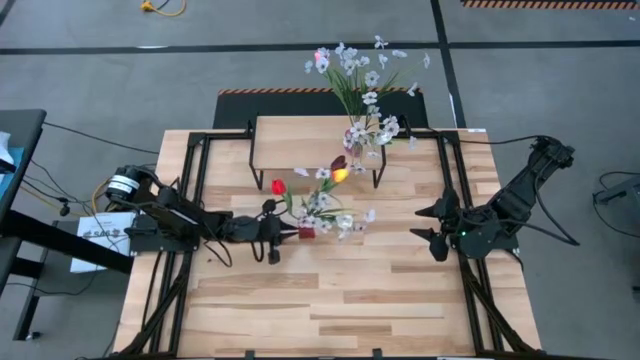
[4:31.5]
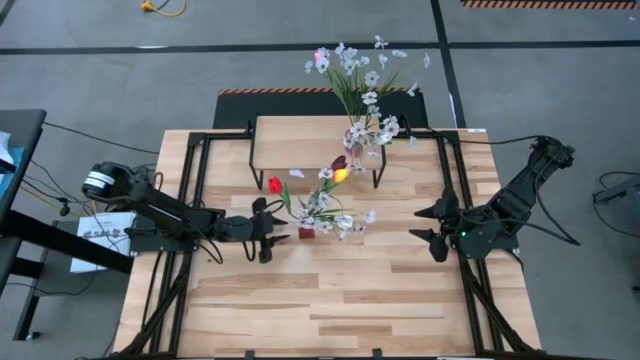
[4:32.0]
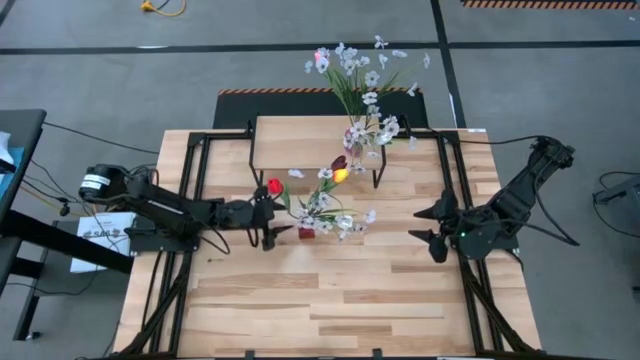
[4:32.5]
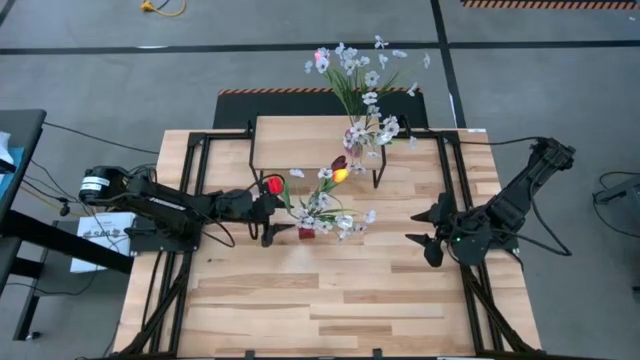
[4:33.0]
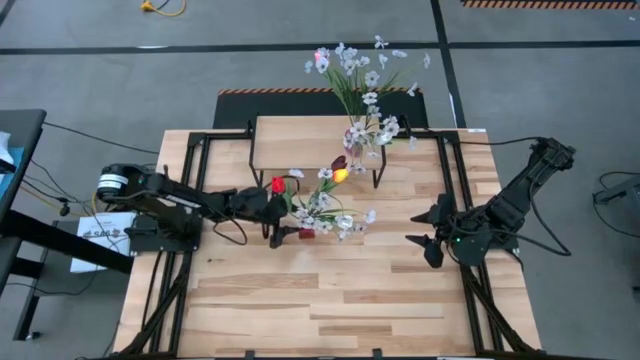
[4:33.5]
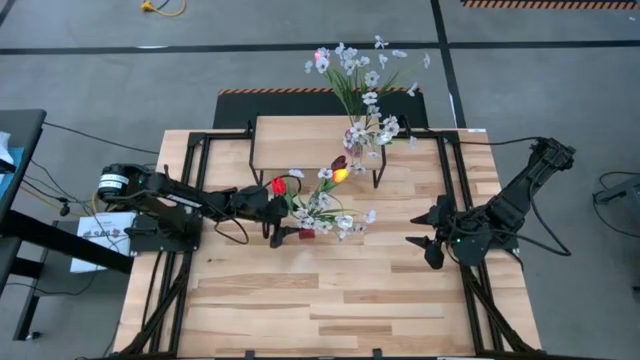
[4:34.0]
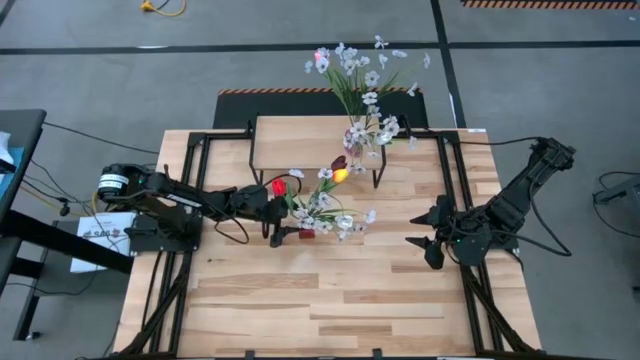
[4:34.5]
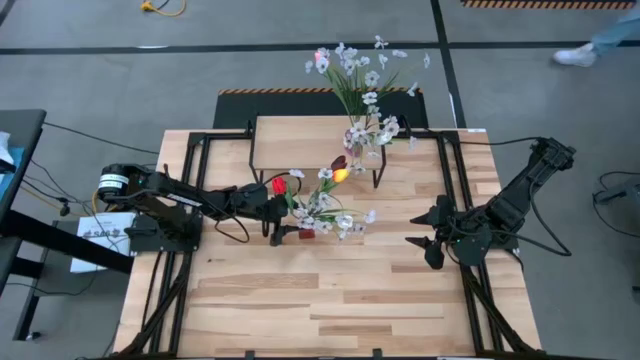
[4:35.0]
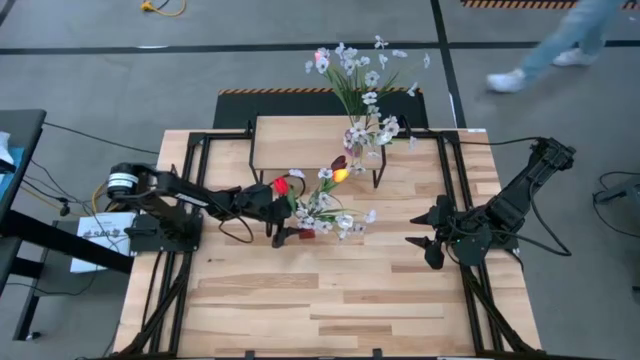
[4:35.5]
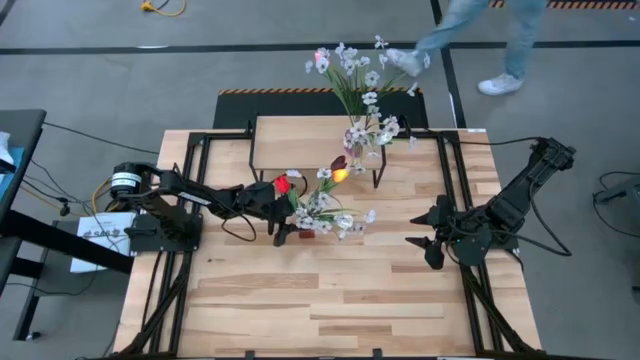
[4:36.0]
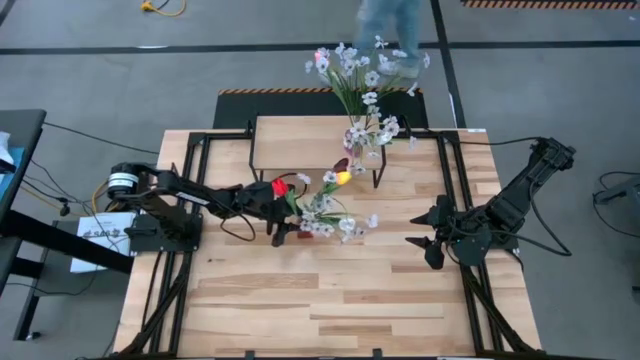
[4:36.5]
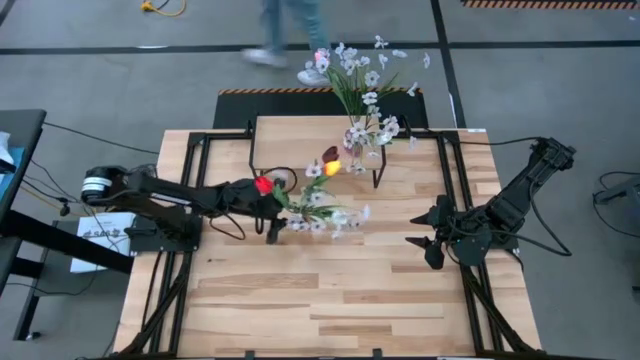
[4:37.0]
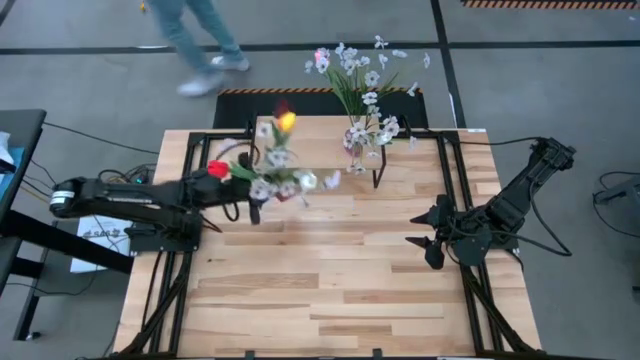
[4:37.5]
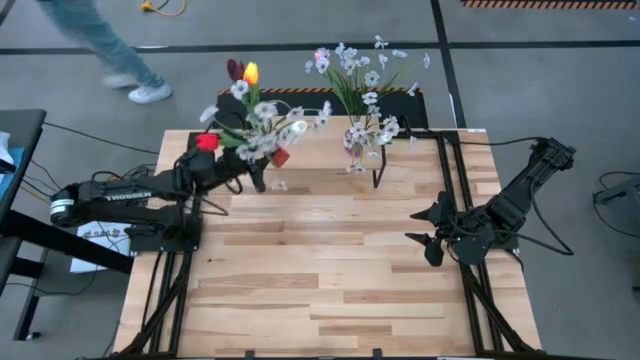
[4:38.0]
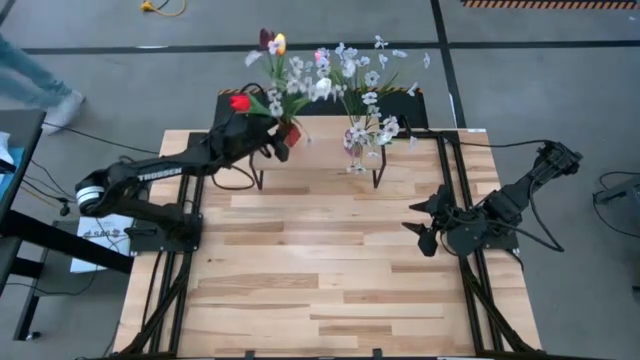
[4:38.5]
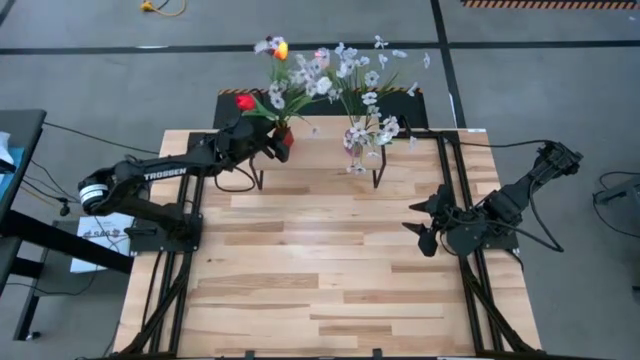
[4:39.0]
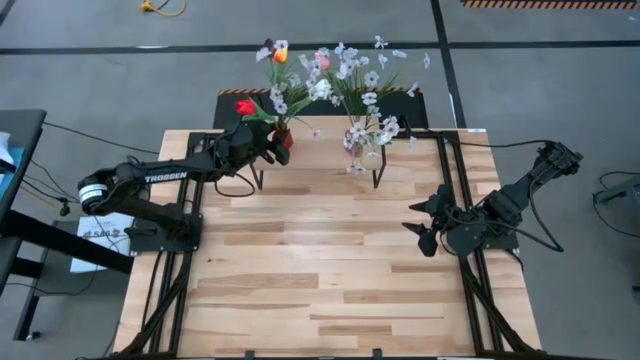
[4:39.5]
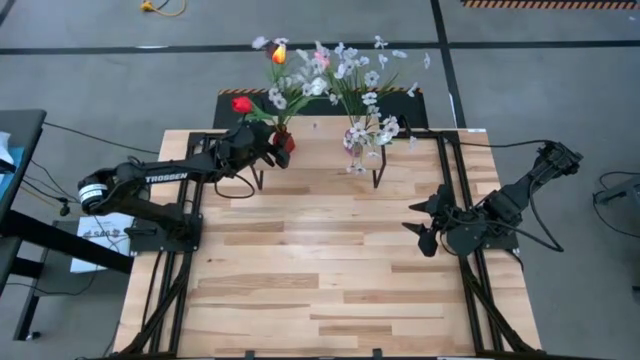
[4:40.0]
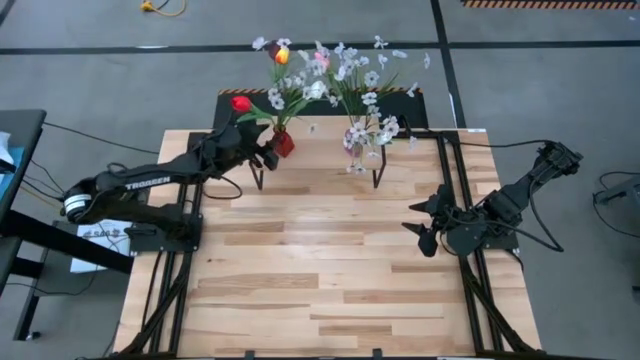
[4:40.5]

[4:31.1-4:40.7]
Task: Pick and place flowers into a vace then onto a shelf
Put the red vase on the shelf

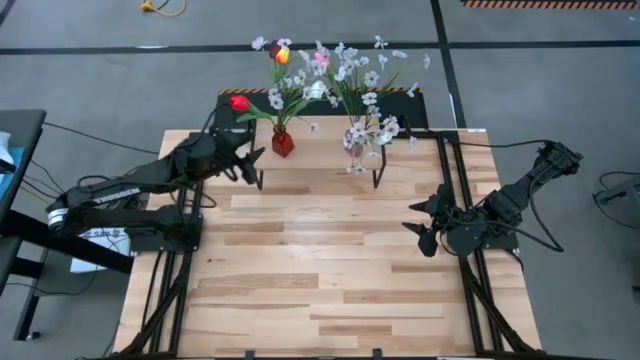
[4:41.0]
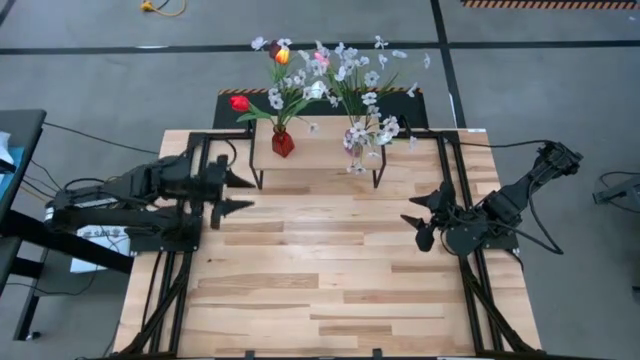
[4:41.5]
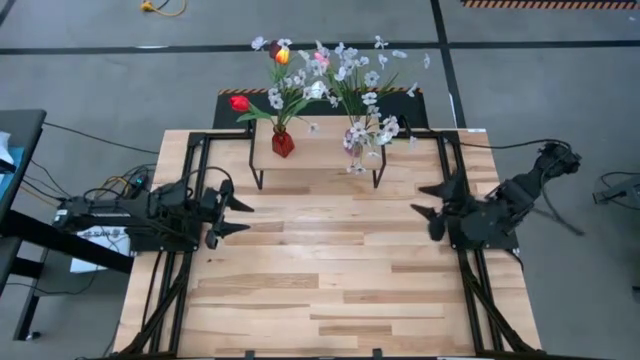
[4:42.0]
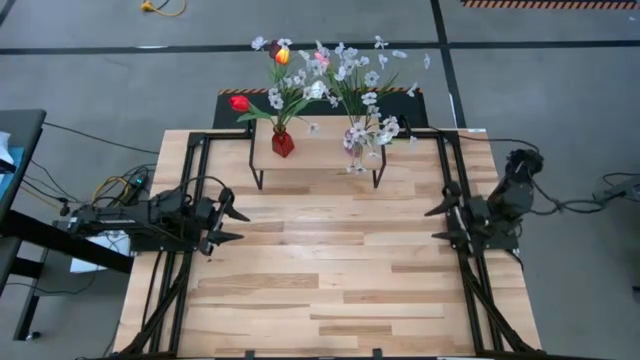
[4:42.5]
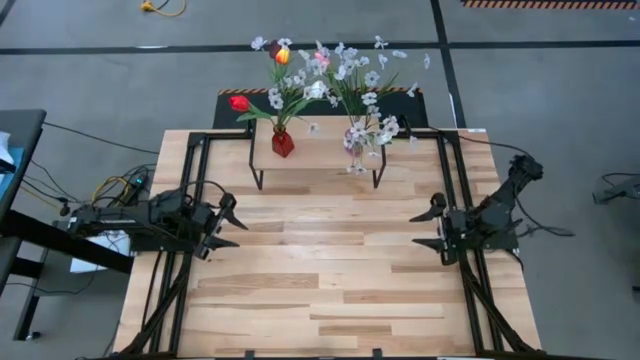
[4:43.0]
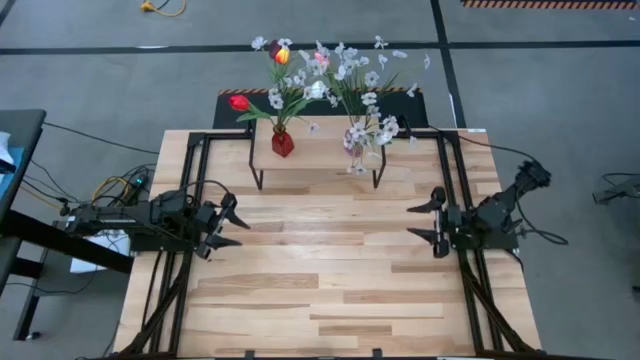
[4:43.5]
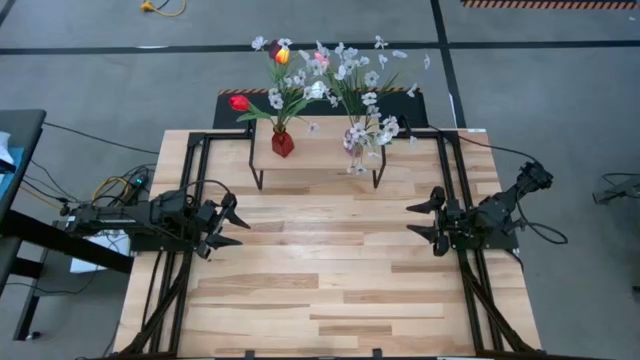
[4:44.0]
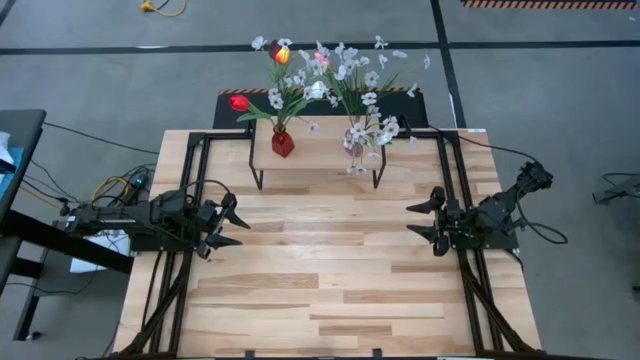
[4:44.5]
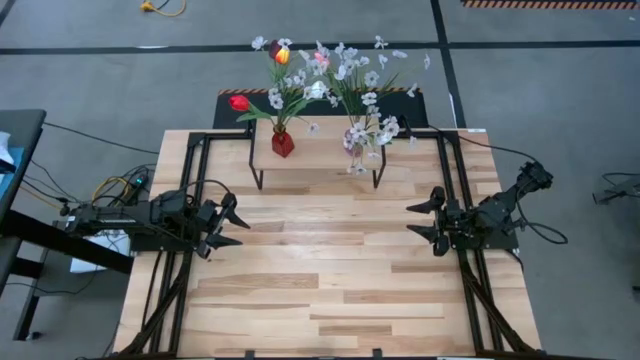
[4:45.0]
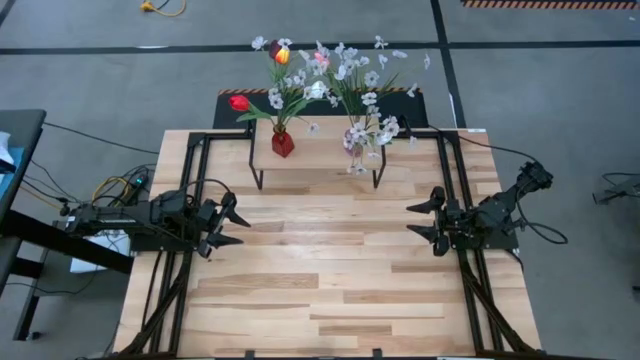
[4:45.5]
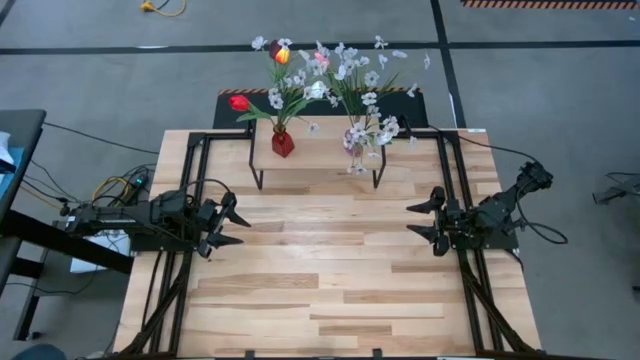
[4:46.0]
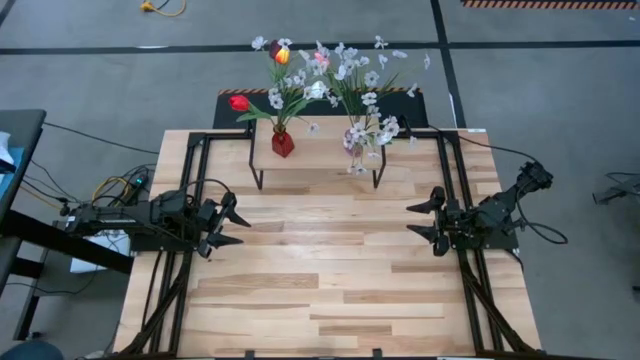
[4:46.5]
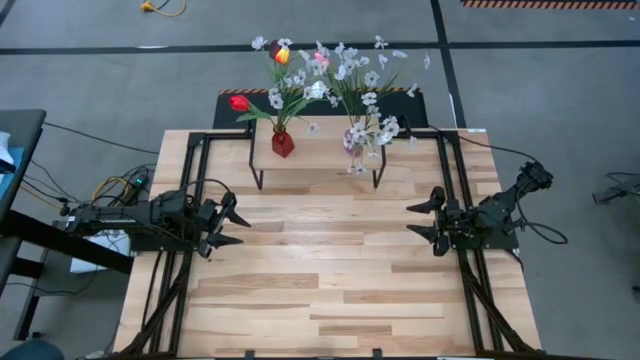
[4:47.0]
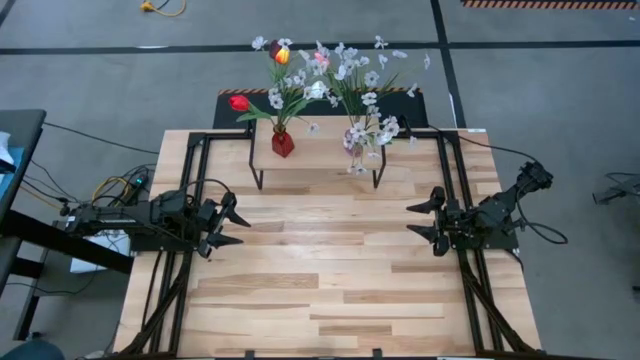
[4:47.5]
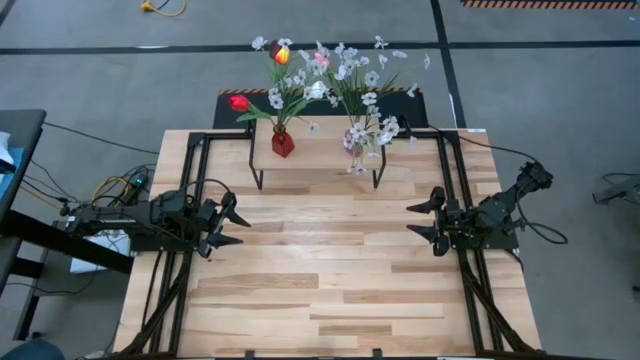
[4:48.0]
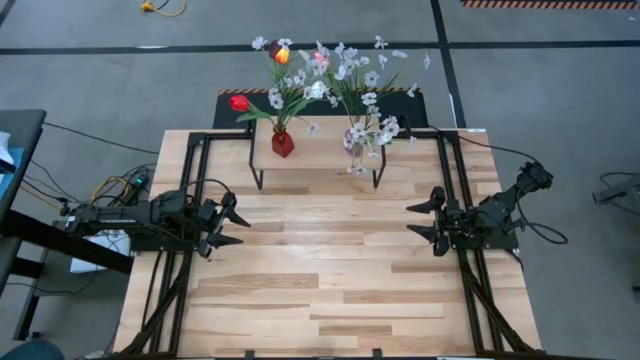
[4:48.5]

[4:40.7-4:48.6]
Return to Home Position

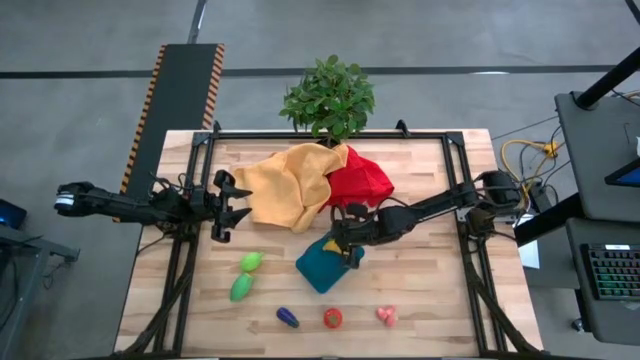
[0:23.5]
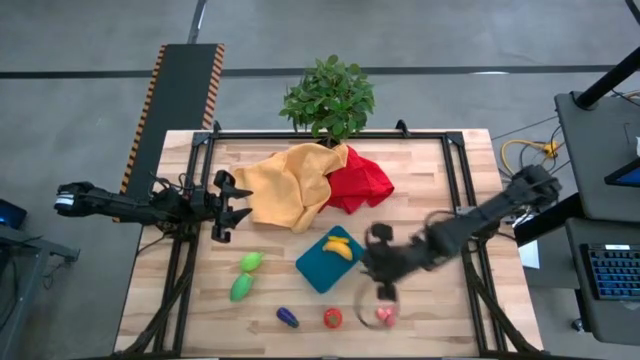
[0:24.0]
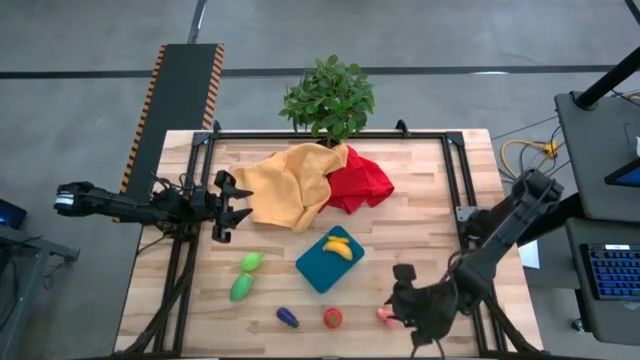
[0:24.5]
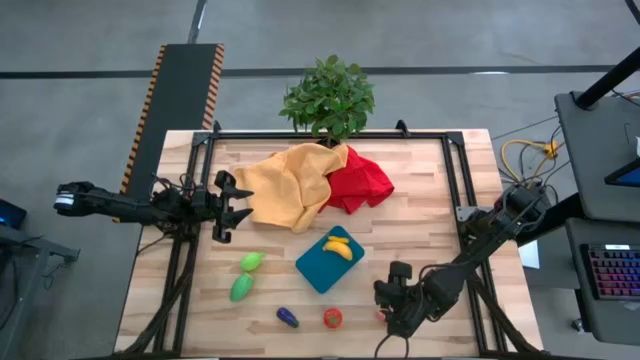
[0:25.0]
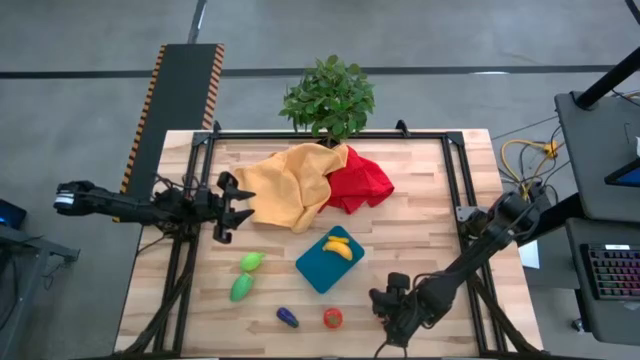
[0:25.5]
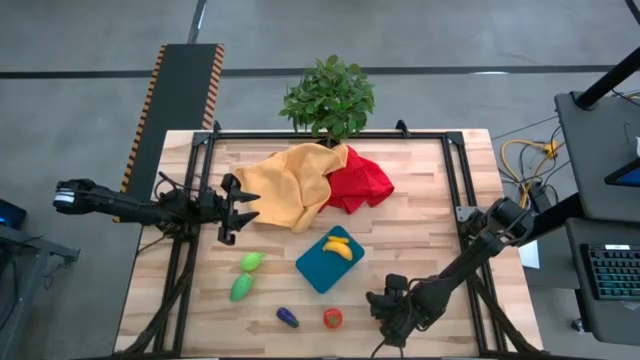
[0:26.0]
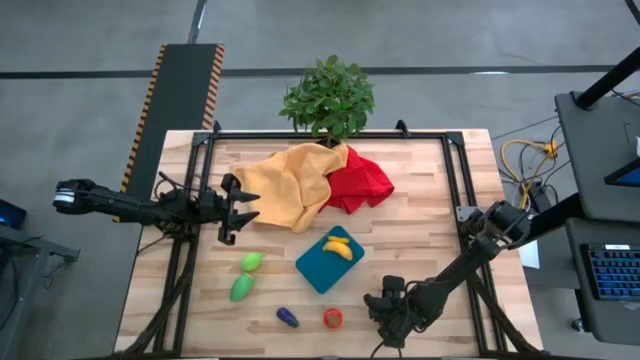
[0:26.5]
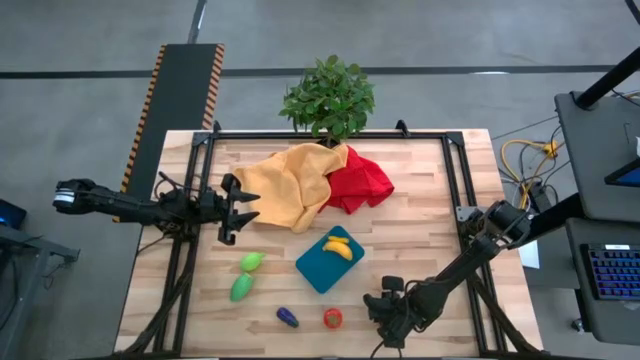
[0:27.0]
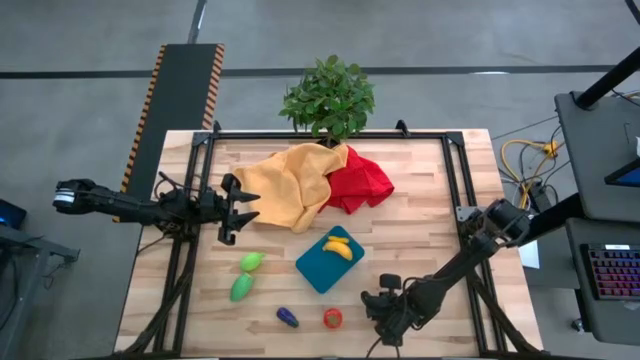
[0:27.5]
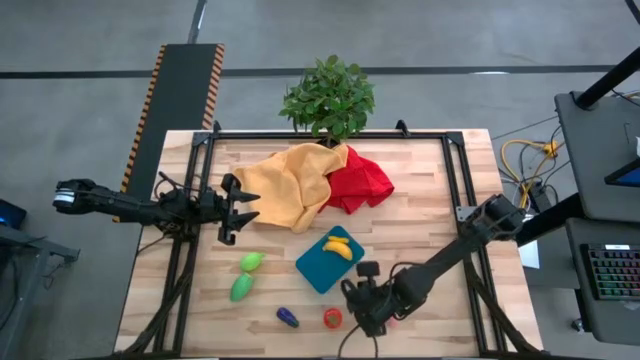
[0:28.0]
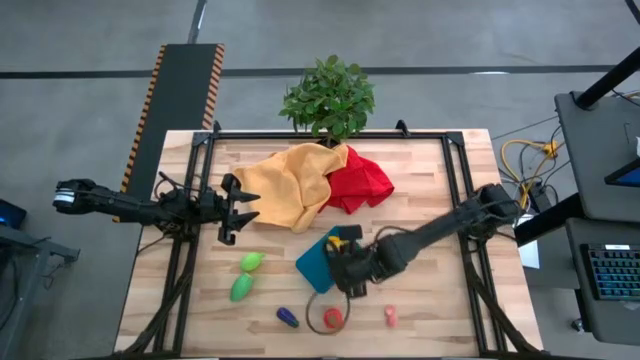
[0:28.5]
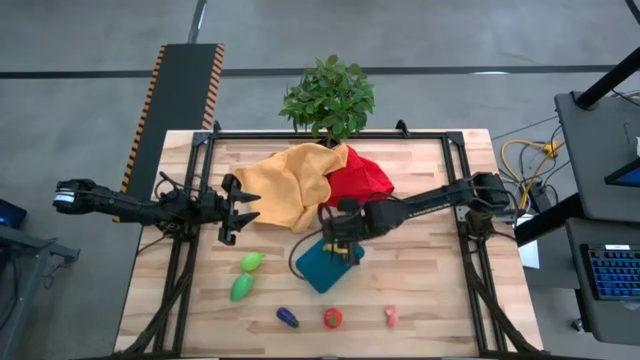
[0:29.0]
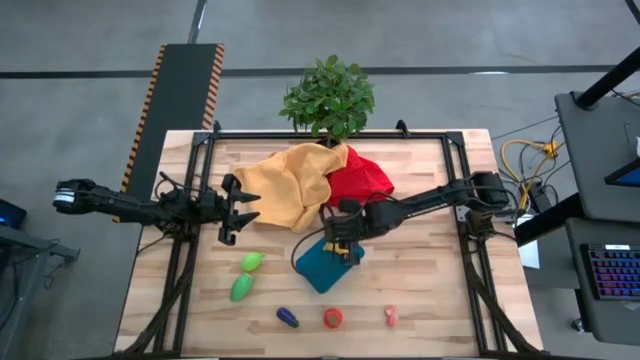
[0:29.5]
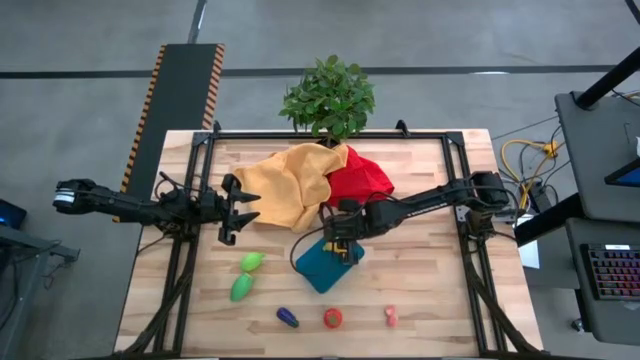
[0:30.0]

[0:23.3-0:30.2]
Task: Pick and placing Produce into tupperware
Put the top left pink peach into the blue bin
